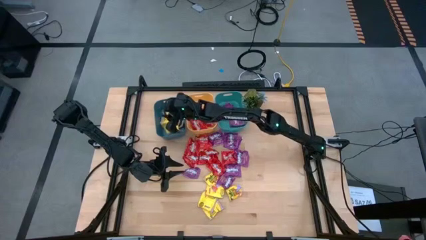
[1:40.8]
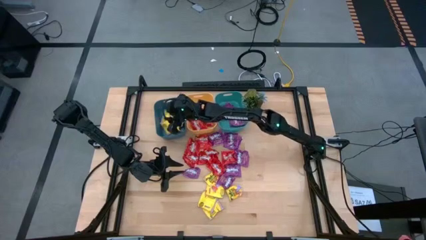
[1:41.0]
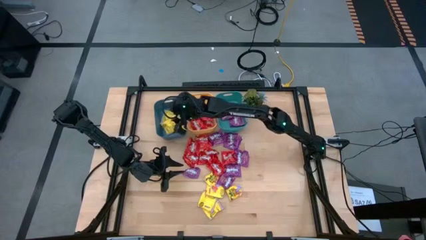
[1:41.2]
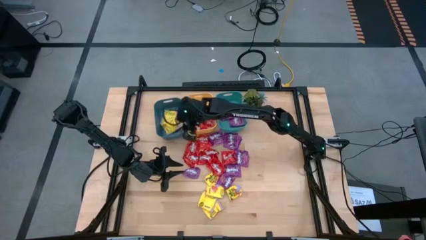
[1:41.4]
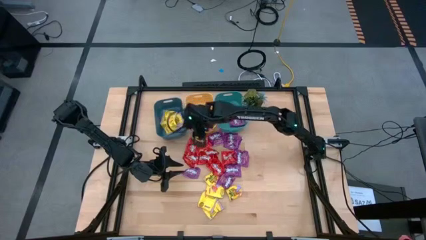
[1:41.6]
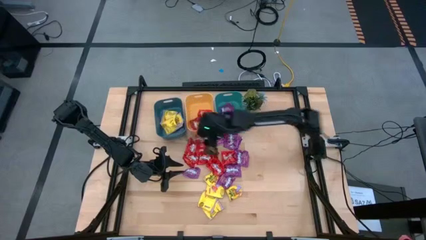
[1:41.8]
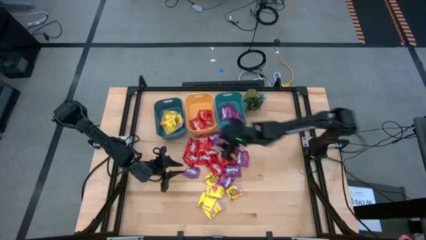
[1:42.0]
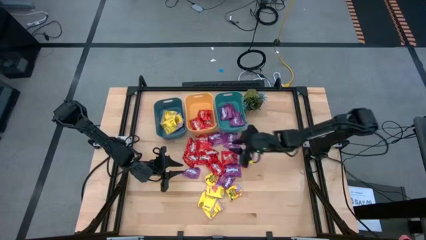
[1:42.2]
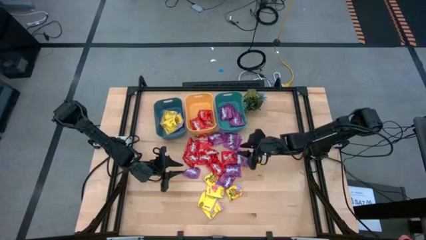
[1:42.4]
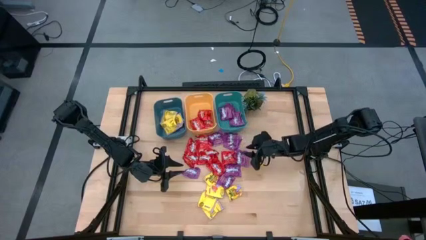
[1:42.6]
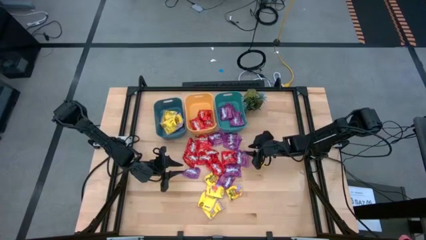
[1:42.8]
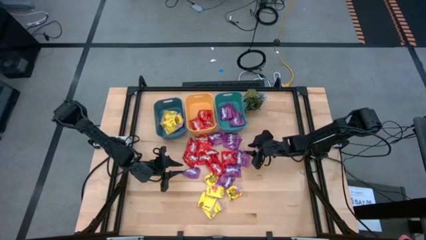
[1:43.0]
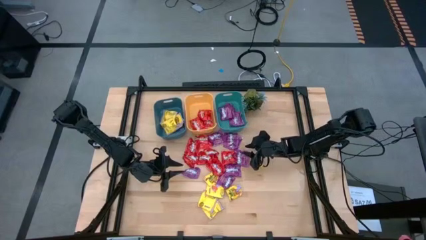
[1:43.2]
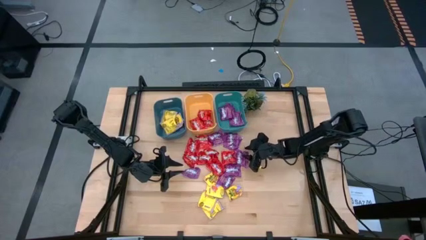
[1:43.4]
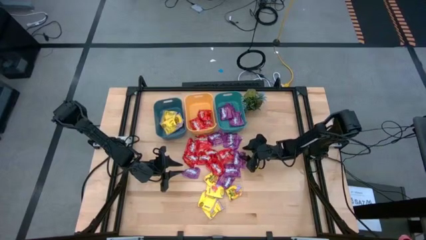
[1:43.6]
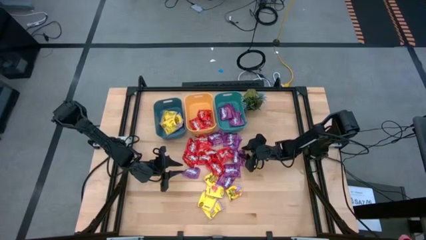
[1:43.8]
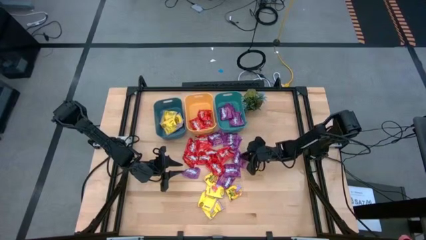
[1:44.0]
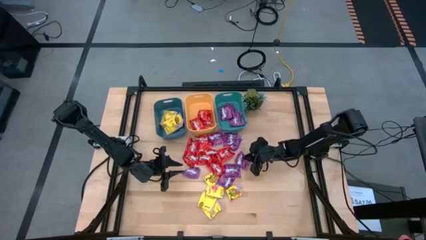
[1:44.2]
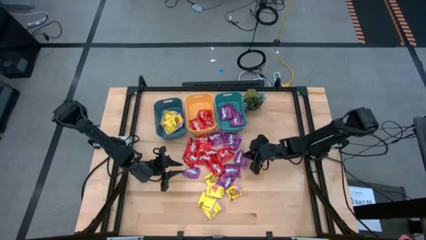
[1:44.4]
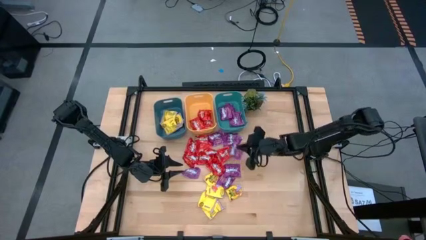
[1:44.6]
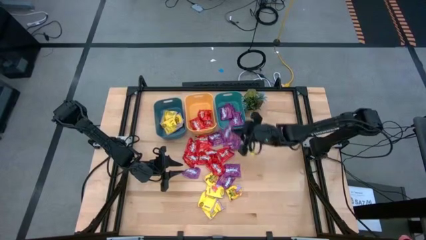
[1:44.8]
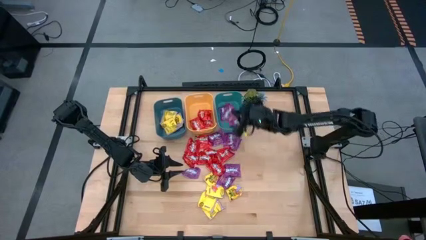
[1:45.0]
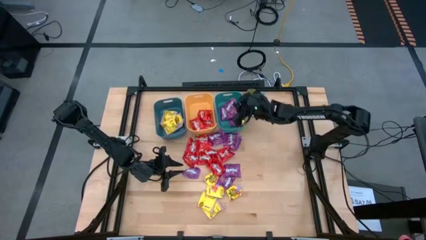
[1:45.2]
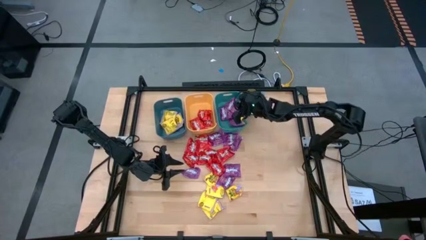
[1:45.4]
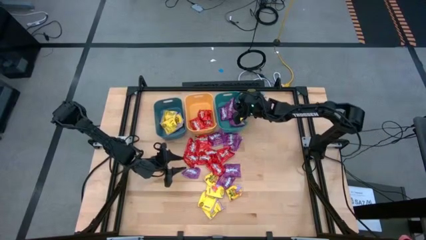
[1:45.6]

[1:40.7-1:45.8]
Task: Sort candy
Put the purple candy into the green bin

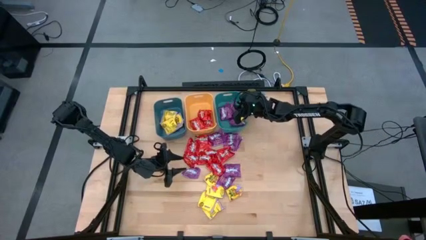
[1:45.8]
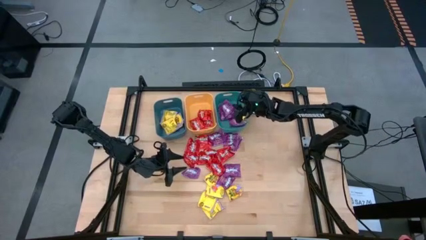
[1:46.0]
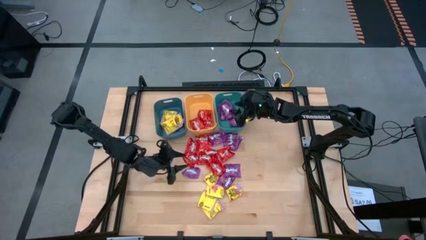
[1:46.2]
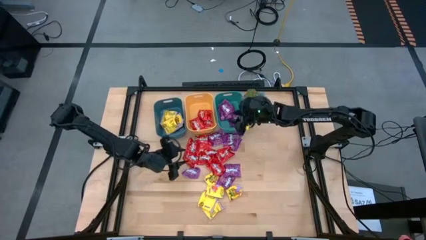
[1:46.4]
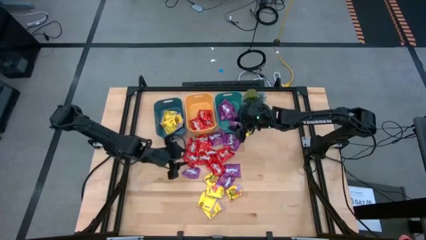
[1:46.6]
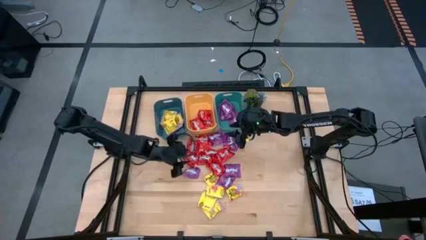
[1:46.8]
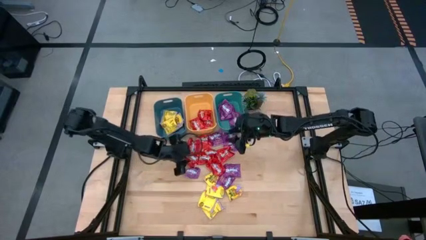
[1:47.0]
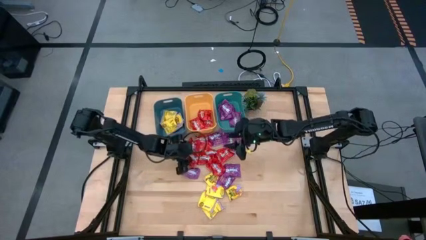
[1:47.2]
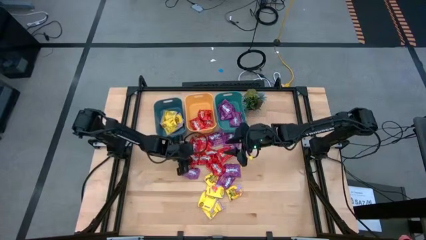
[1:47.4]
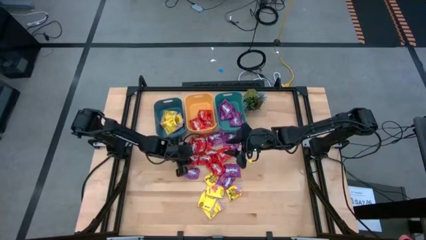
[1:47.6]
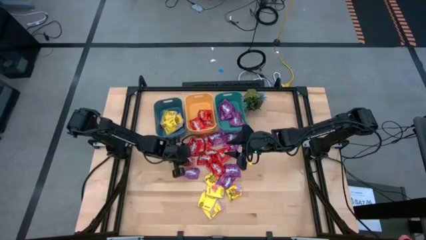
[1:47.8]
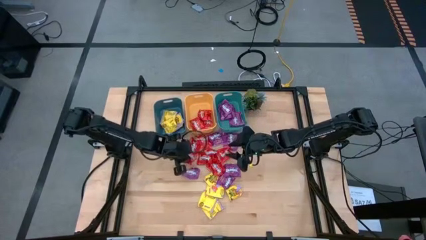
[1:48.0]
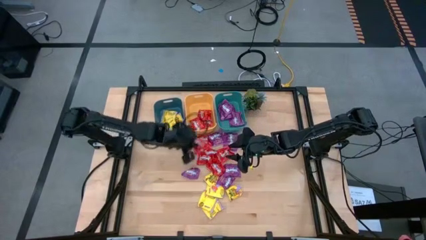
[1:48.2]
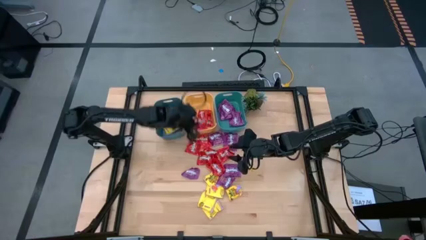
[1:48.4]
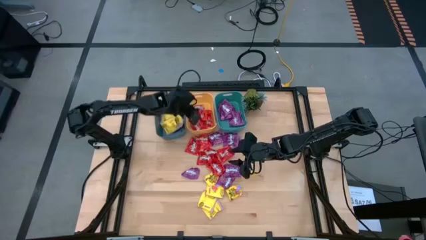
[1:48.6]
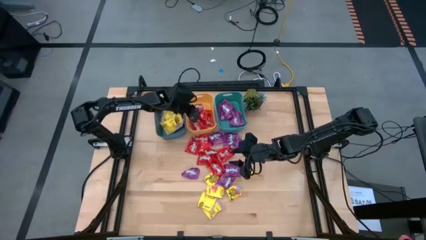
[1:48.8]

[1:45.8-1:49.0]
Put the red candy into the yellow bin

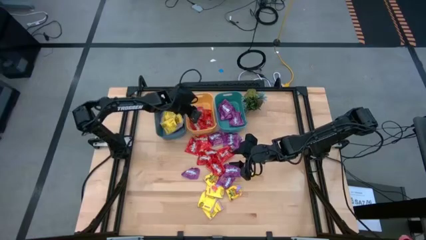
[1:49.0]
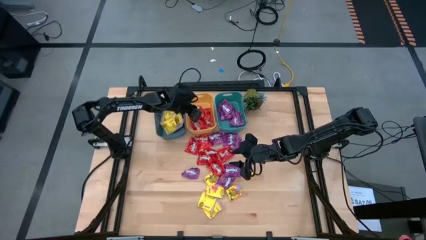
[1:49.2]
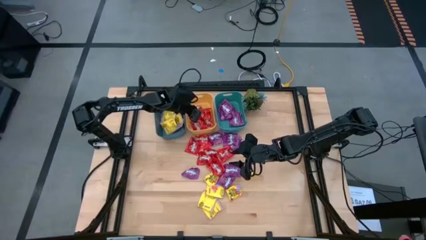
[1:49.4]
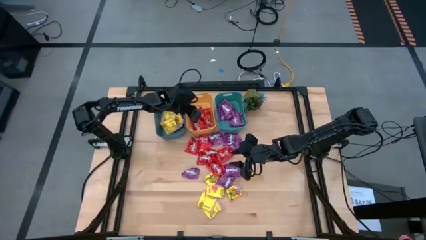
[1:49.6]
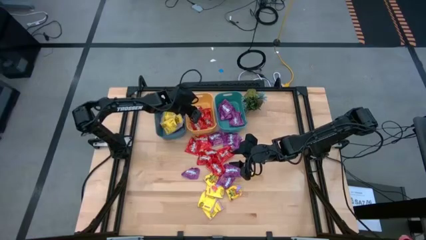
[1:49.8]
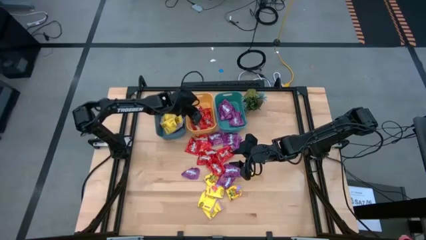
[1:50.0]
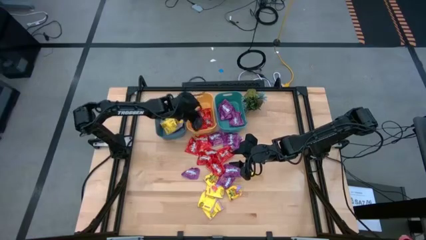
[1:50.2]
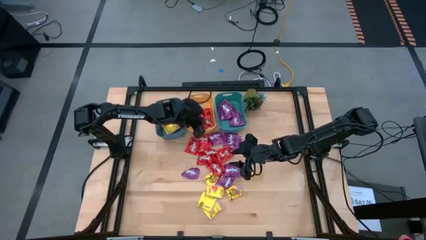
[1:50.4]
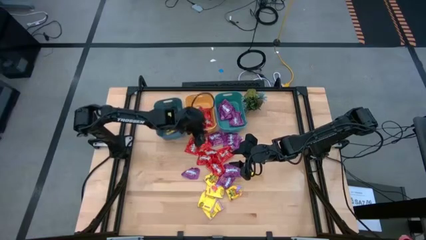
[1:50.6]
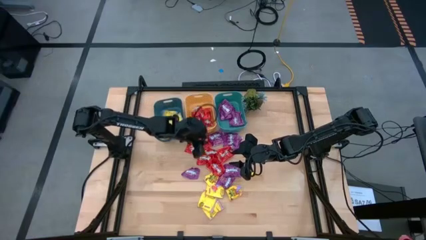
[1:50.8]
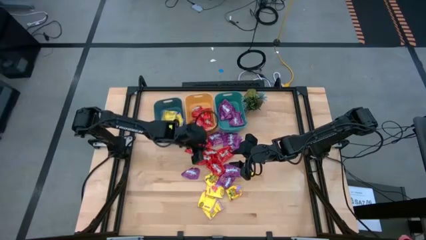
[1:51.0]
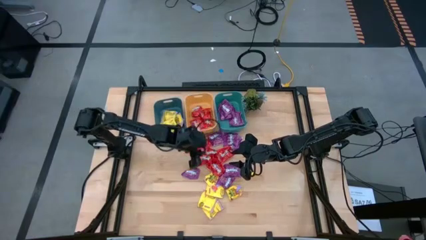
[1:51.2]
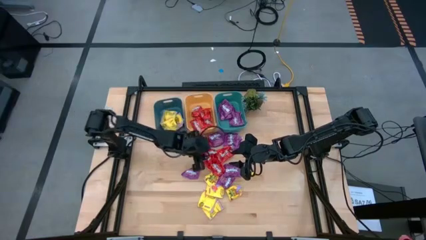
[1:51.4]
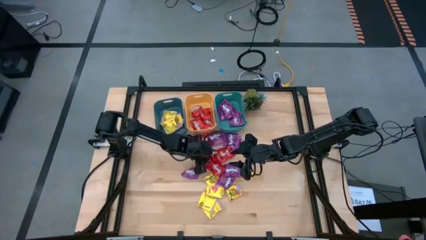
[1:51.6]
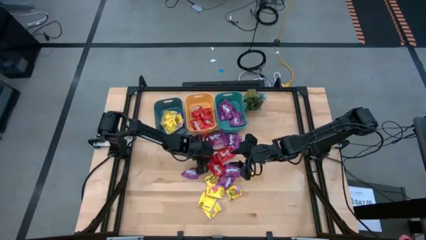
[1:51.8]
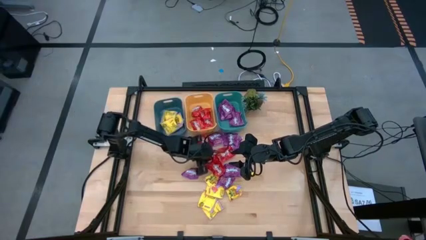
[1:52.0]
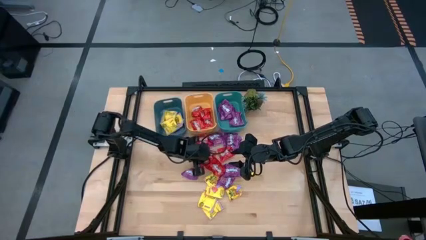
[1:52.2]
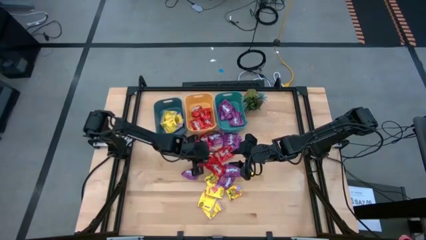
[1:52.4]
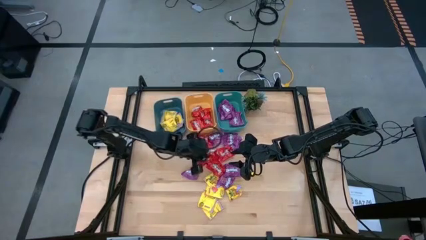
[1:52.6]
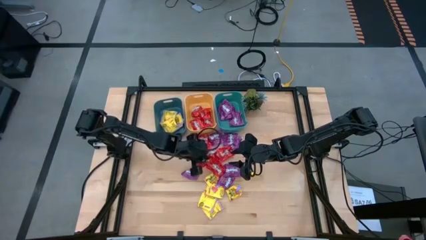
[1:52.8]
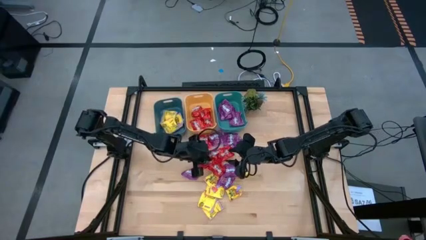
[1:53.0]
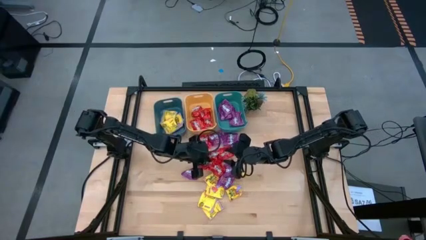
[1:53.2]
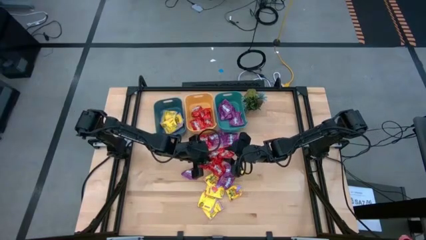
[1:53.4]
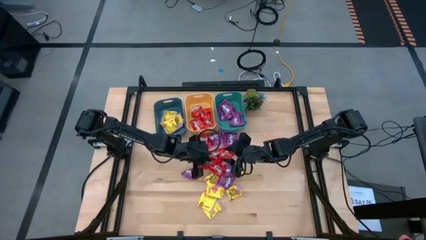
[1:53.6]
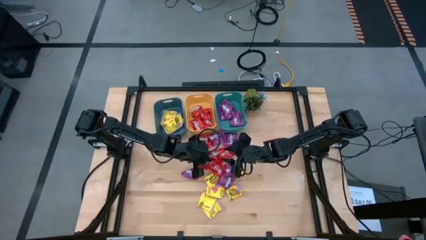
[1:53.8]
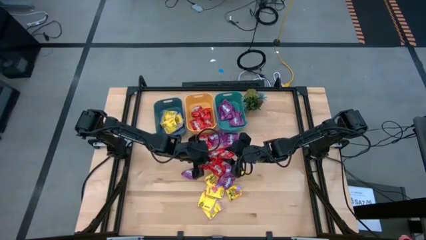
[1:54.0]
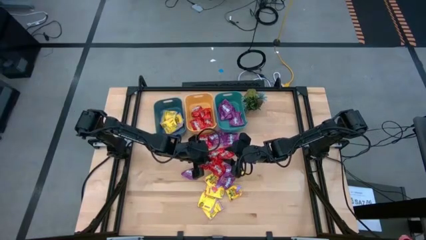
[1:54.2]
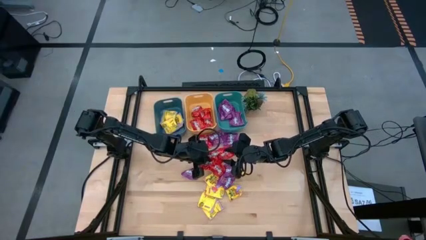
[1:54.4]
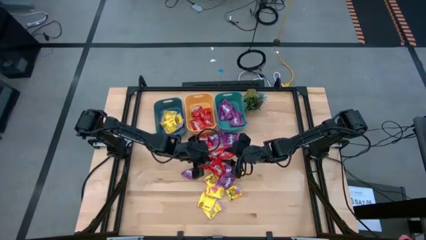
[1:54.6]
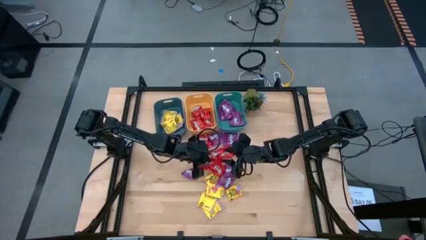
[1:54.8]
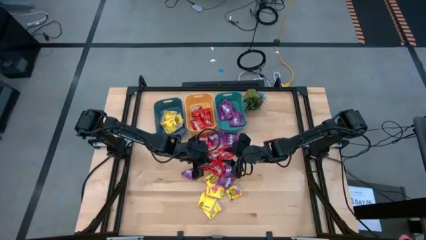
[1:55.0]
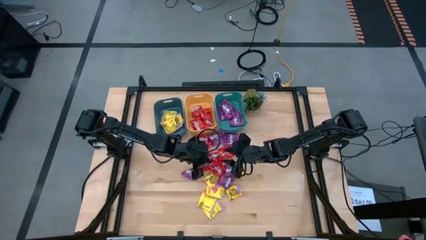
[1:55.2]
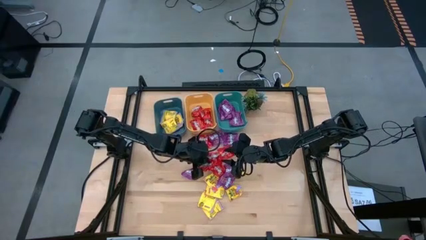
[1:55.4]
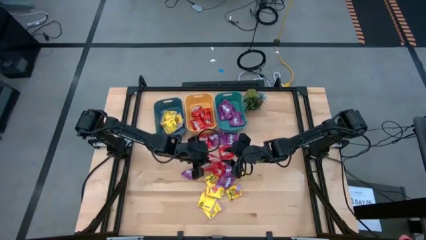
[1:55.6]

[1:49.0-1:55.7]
Put the red candy into the yellow bin

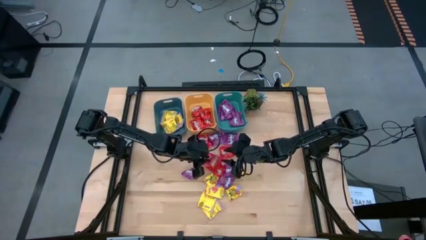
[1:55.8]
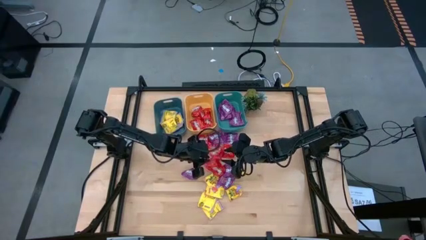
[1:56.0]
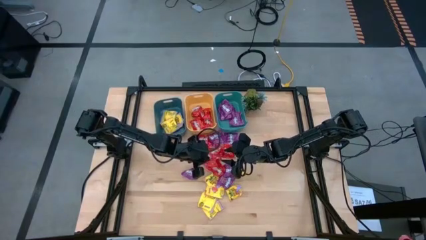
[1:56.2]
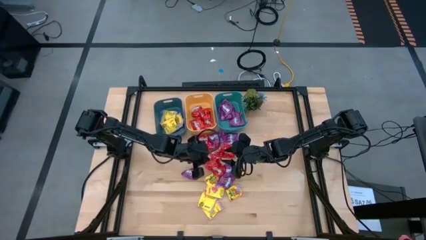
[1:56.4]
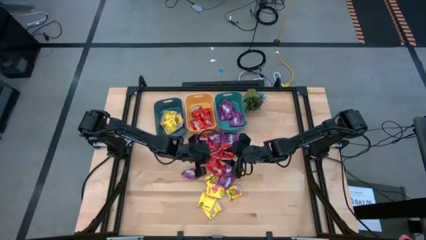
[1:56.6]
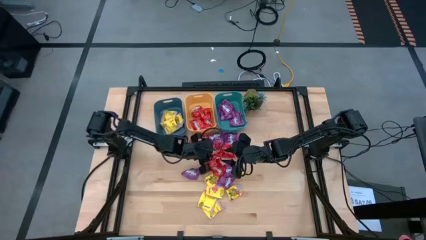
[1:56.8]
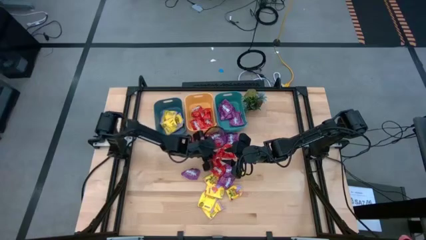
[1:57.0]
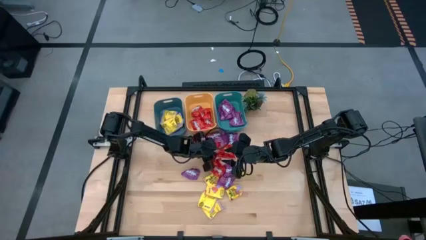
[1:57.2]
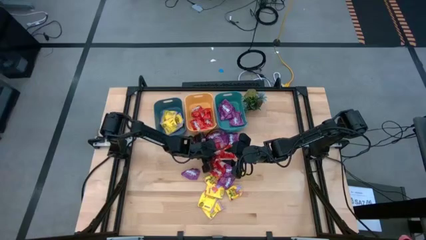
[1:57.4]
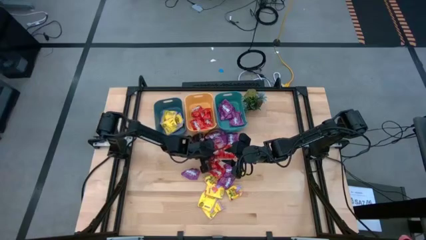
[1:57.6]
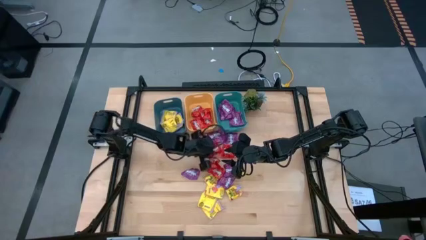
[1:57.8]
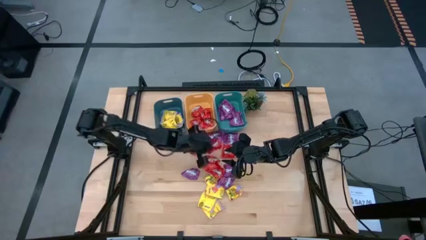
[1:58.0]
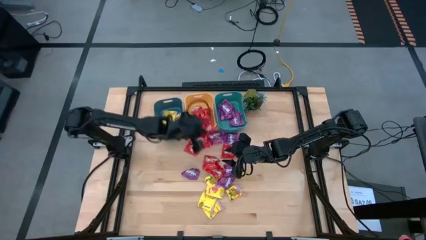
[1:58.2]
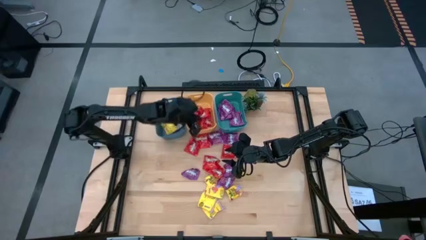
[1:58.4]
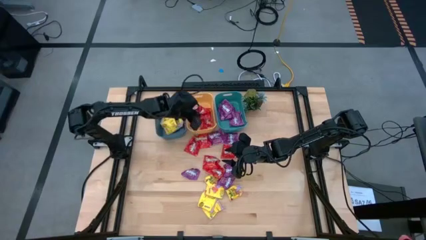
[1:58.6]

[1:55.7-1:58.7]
Put the red candy into the yellow bin
